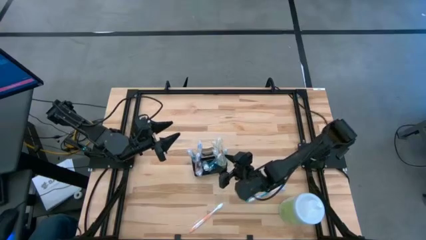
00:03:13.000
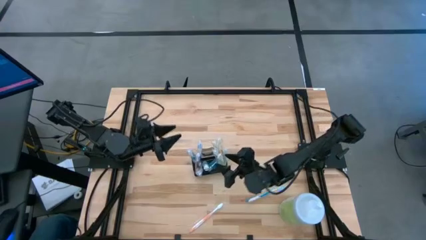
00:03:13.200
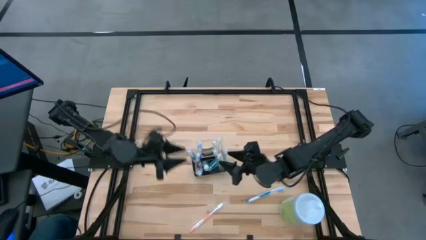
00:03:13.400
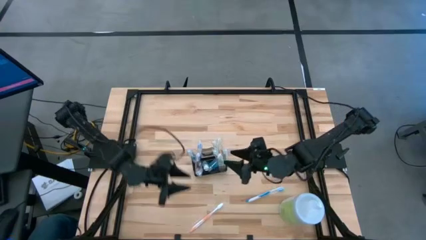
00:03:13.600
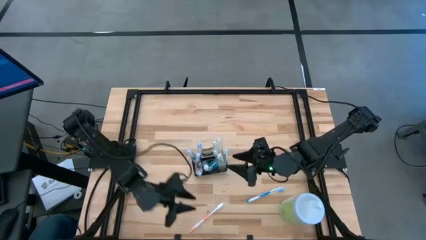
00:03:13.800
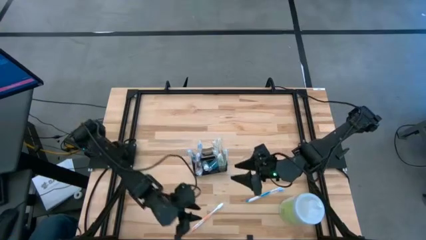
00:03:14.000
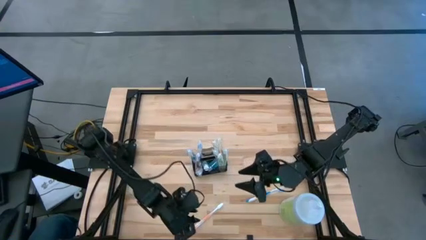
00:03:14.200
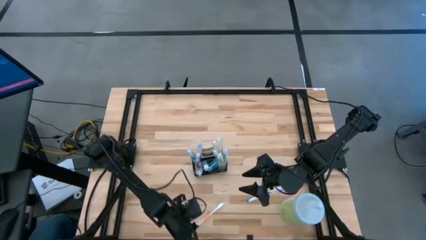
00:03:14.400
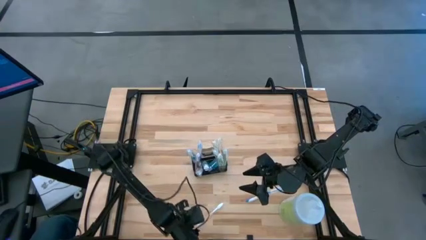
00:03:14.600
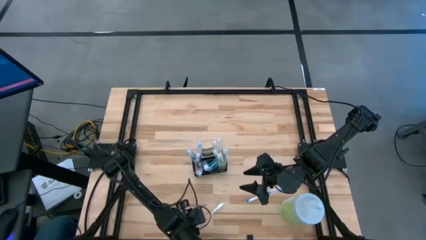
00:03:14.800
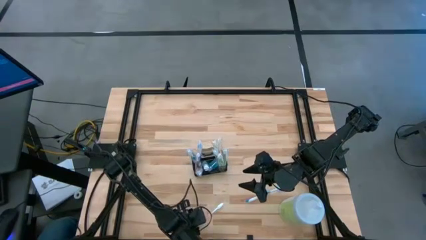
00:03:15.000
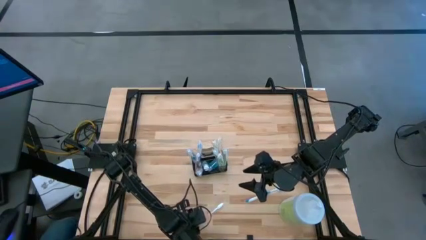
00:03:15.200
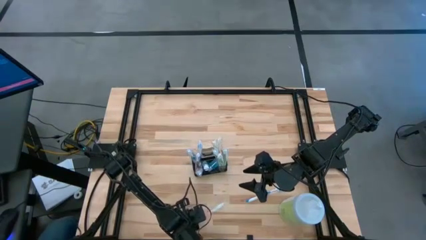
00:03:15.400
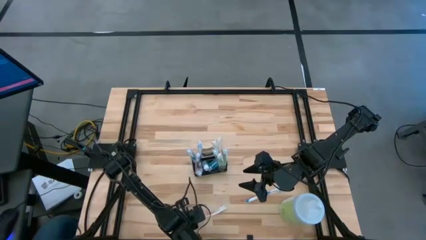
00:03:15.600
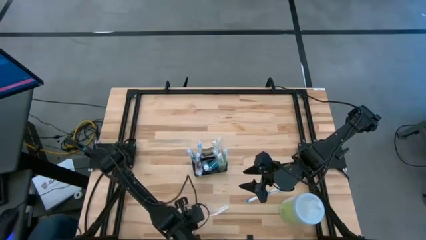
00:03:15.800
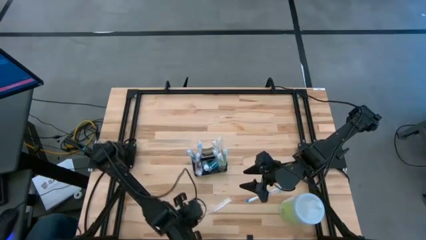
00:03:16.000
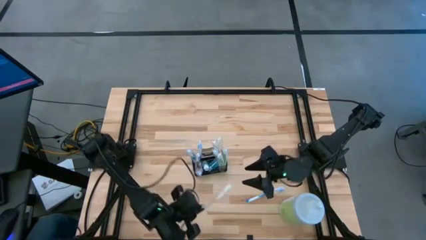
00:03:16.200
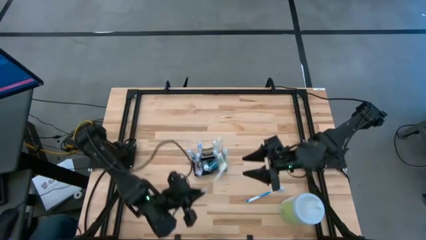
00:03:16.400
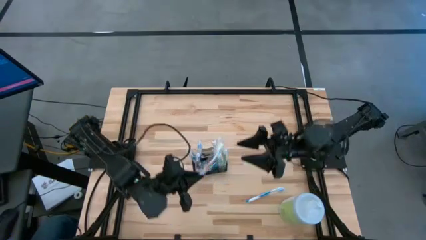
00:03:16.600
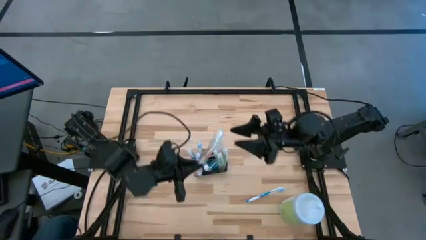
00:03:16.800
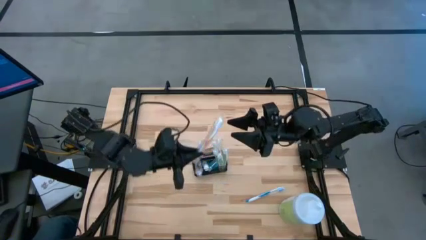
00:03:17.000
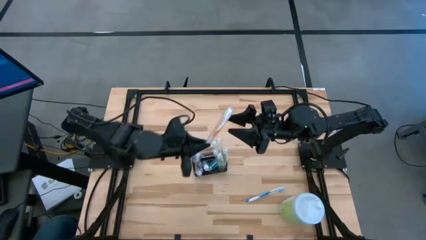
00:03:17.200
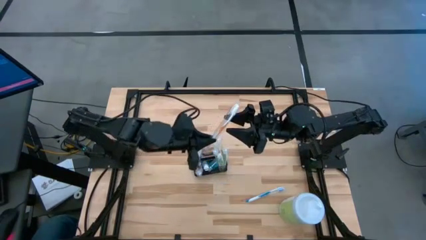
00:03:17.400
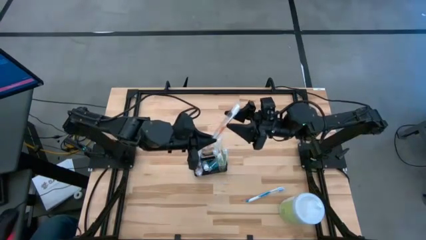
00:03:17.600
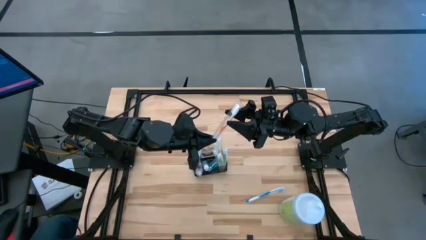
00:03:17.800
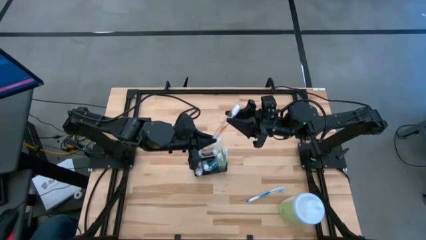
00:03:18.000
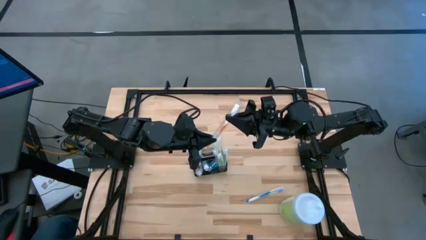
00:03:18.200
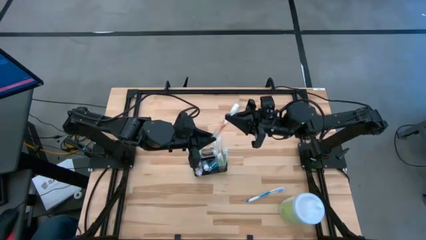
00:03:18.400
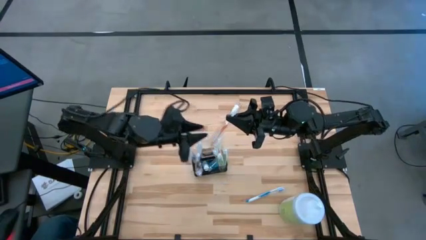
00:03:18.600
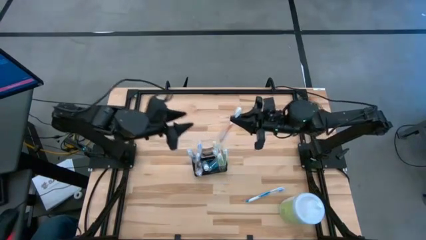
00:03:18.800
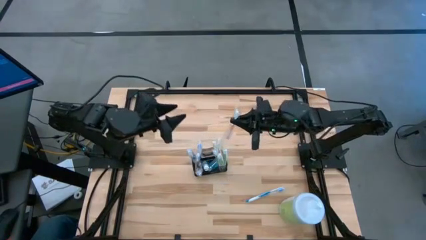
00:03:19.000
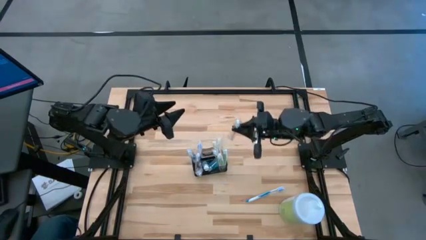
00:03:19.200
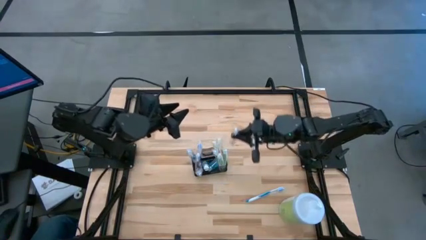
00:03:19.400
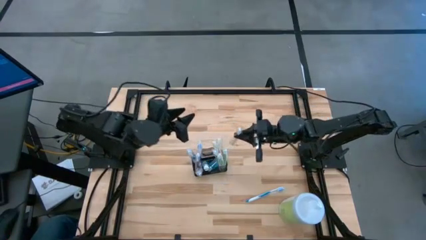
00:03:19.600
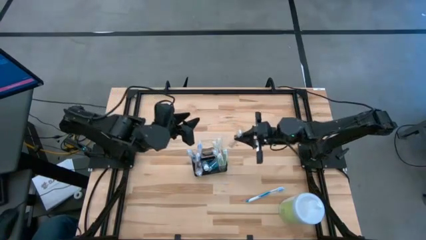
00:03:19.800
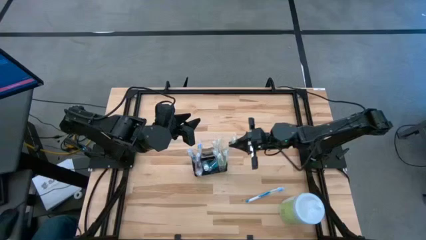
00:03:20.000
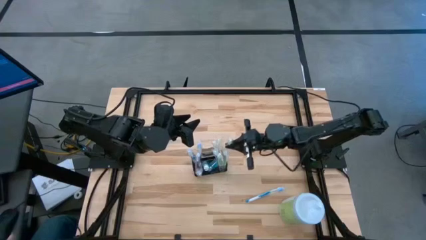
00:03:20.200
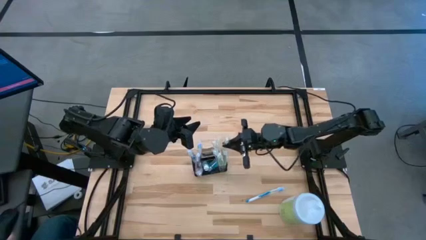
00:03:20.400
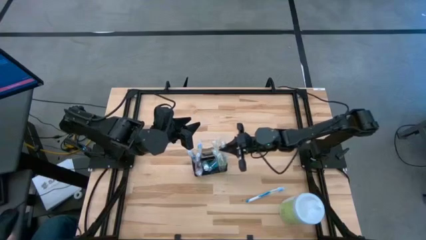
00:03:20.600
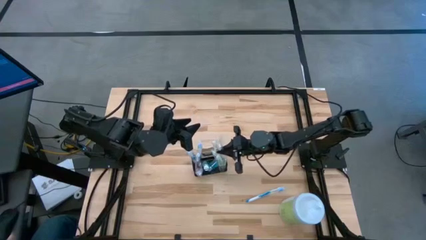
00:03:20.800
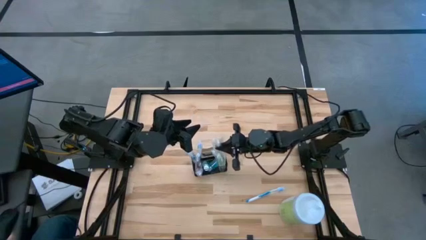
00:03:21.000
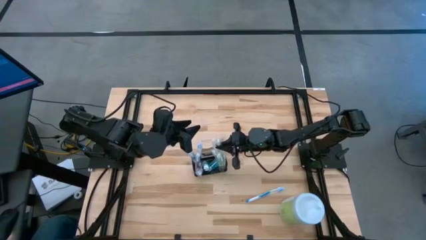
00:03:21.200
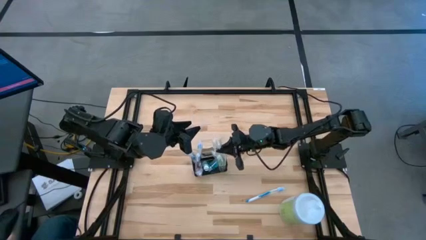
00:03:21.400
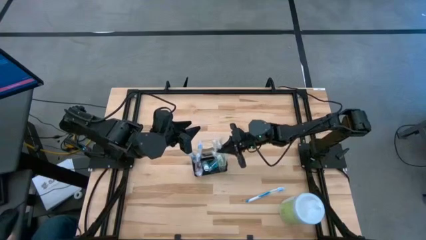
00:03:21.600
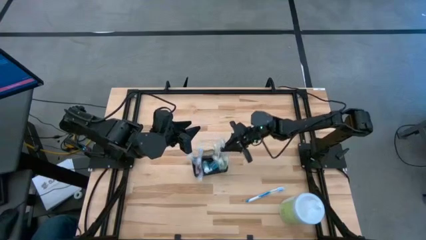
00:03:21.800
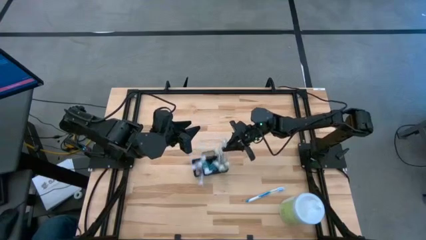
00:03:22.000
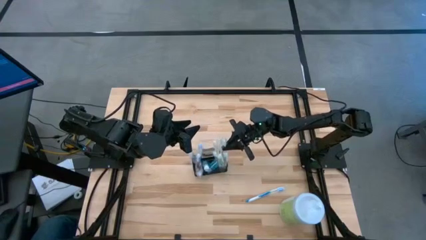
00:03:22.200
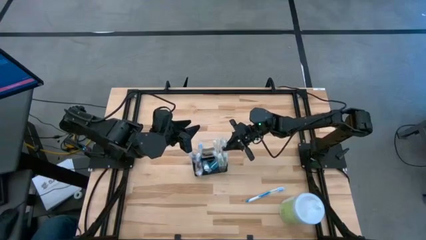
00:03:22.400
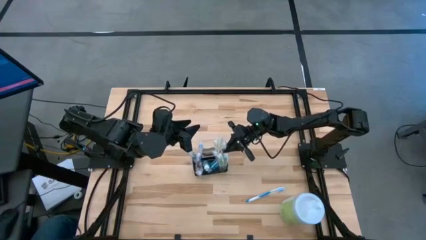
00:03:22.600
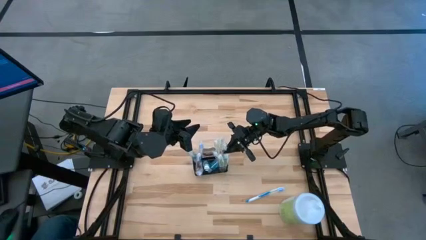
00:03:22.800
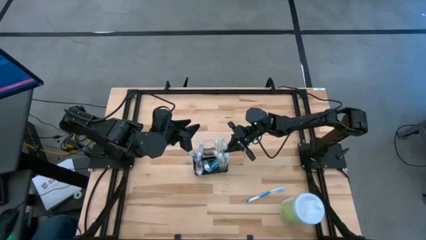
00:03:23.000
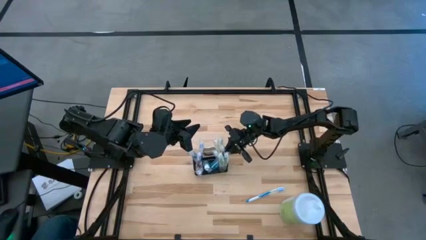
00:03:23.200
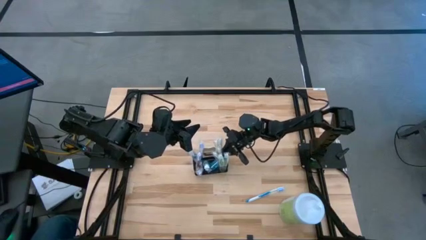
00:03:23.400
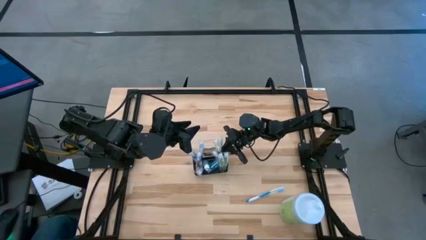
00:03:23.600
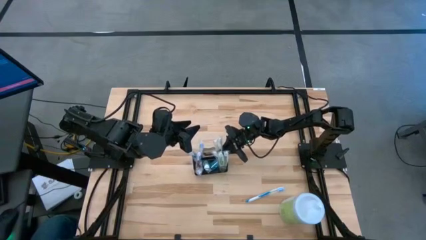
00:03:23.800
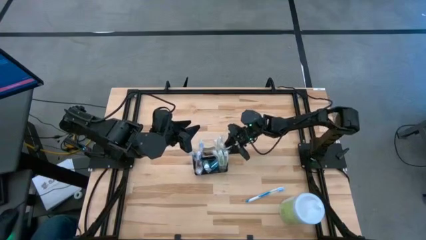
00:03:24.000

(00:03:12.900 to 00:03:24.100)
Task: Pick & Place toothbrushing station
Put the orange toothbrush into the top right section of the mesh organizer

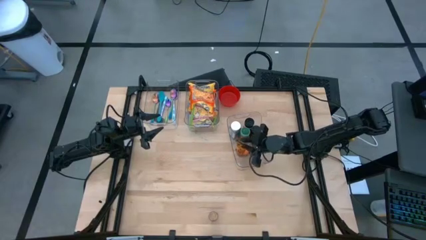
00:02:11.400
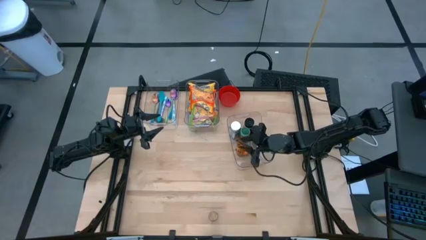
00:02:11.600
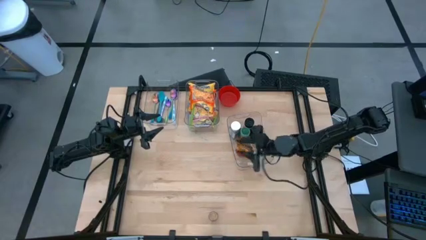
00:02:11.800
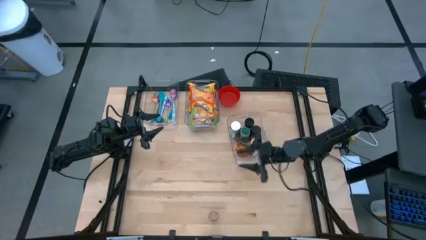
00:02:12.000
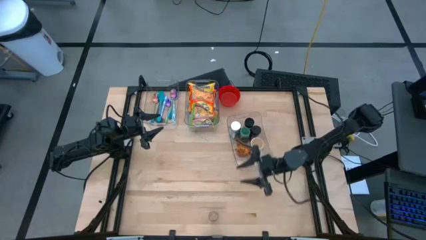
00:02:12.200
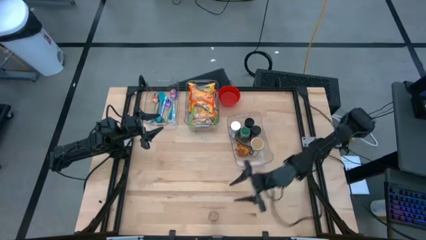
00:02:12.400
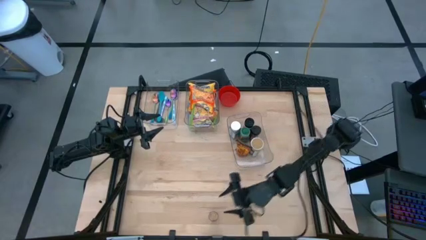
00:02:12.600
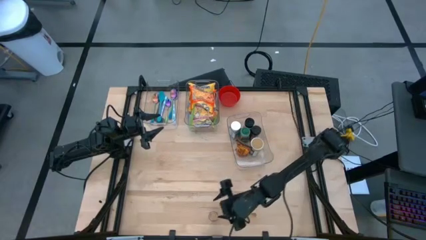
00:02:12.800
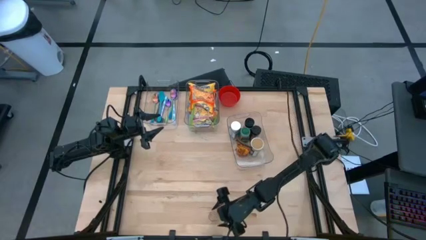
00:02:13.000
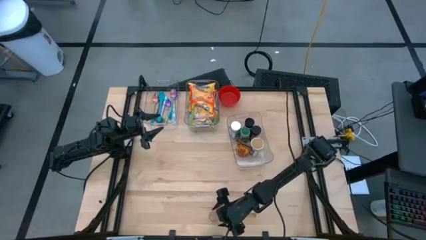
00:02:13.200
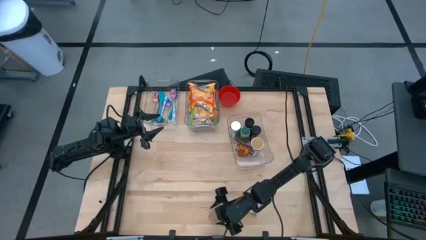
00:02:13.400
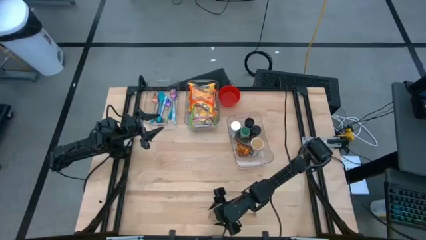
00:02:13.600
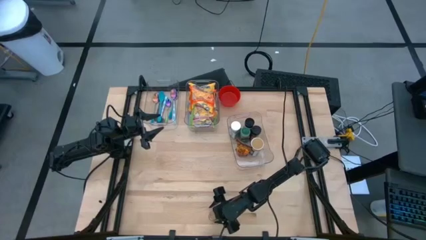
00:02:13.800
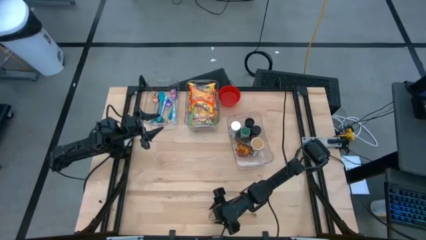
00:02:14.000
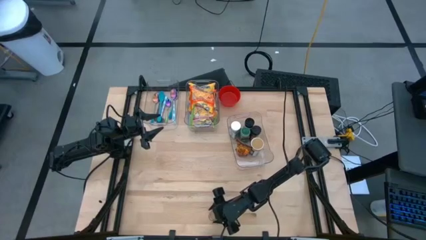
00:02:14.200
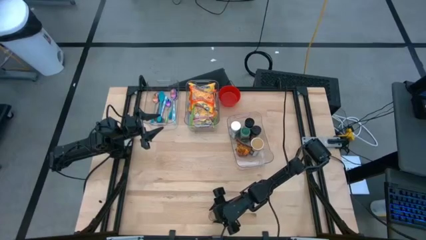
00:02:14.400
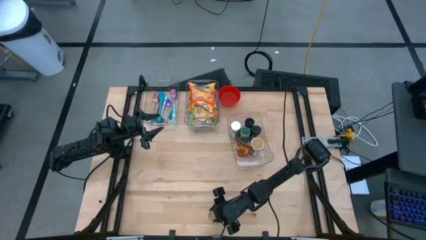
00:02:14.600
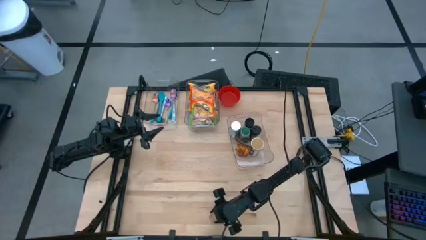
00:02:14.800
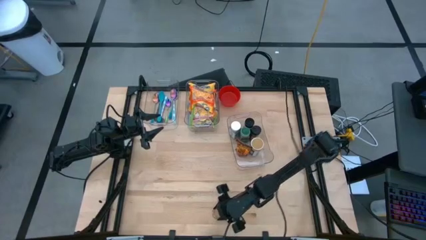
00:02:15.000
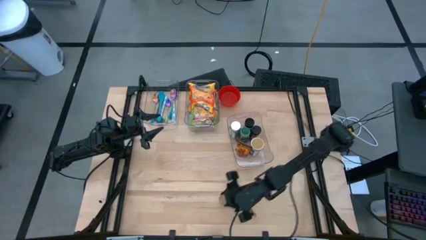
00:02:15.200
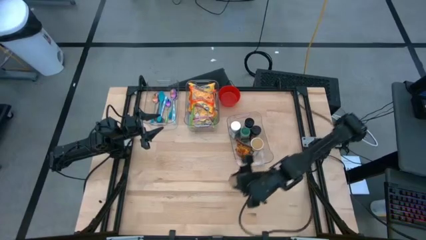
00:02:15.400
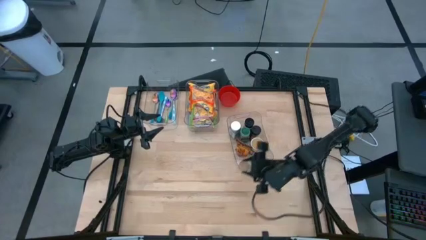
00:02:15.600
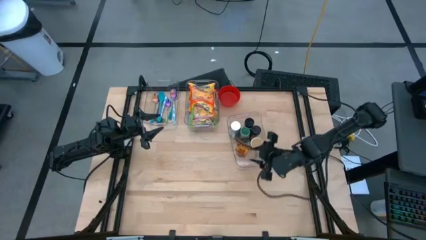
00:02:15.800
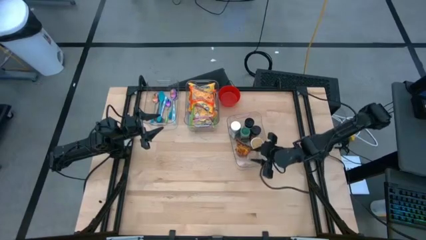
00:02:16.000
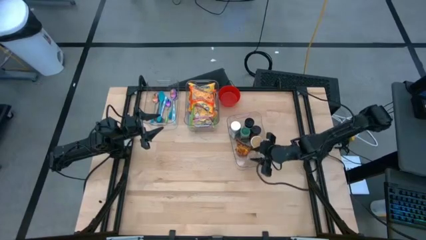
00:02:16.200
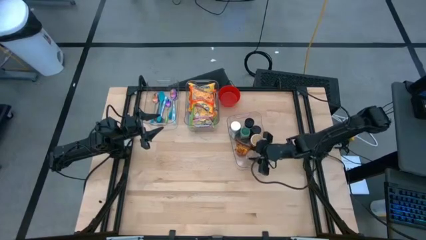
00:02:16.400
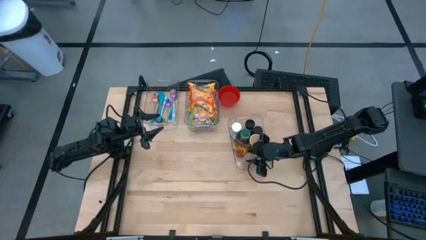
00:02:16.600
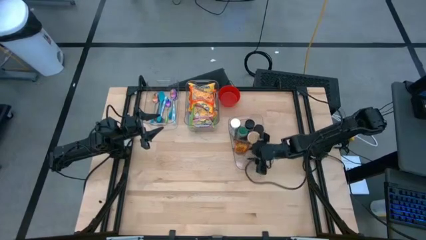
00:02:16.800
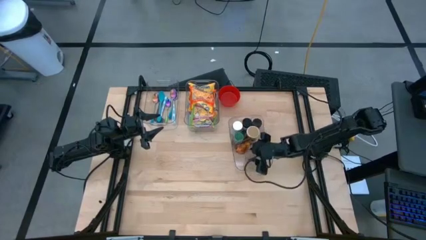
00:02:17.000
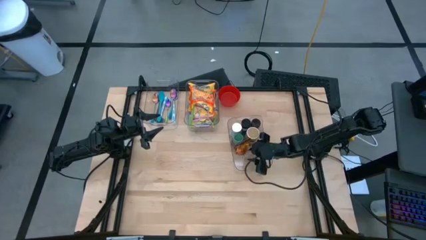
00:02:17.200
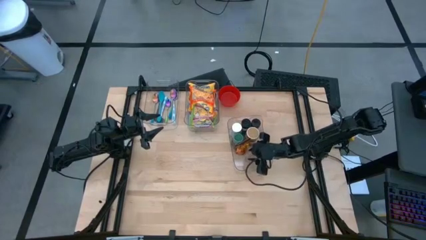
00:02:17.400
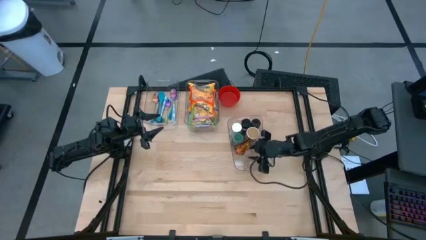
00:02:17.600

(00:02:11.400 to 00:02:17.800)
Task: Pick & Place Food Item
Put the brown seasoning bottle into the bottom right transparent bin
